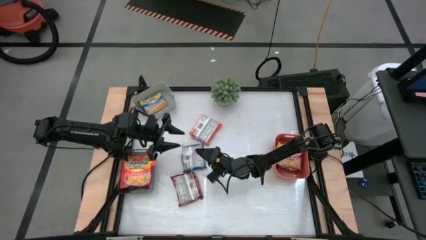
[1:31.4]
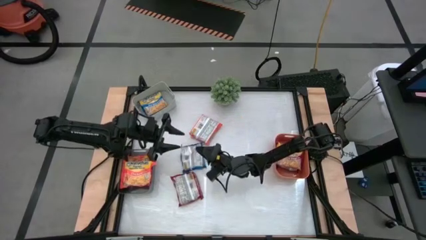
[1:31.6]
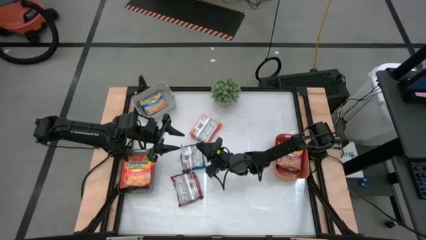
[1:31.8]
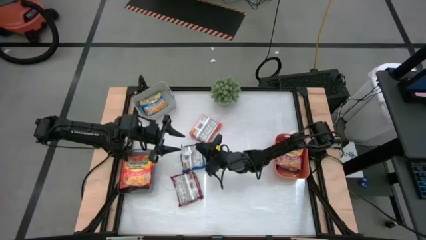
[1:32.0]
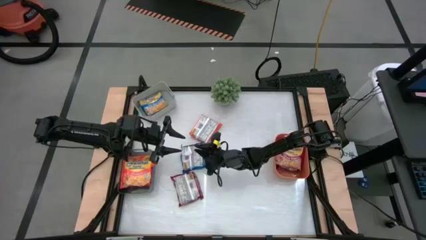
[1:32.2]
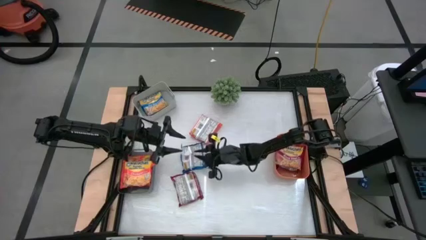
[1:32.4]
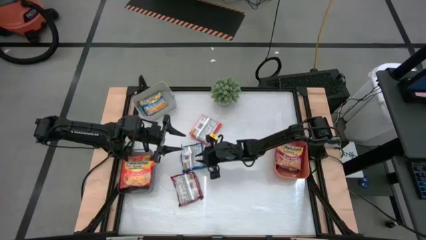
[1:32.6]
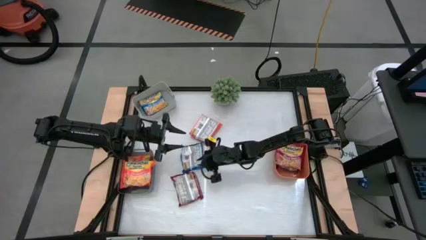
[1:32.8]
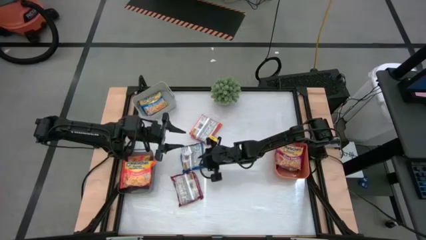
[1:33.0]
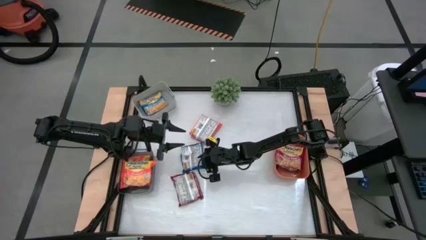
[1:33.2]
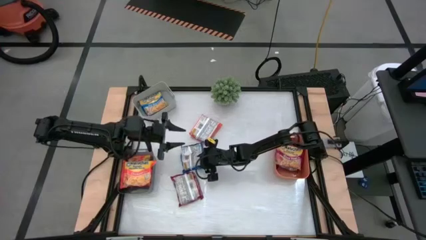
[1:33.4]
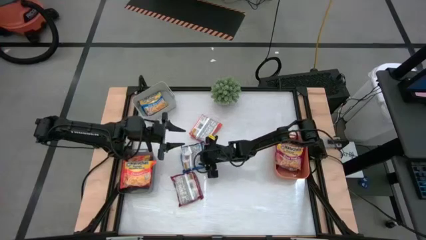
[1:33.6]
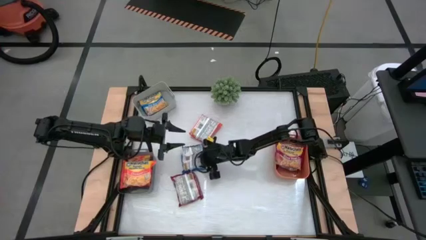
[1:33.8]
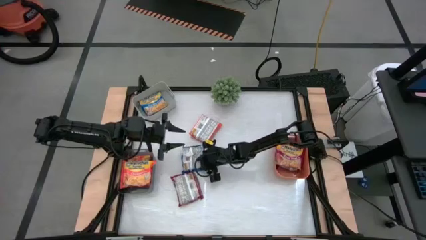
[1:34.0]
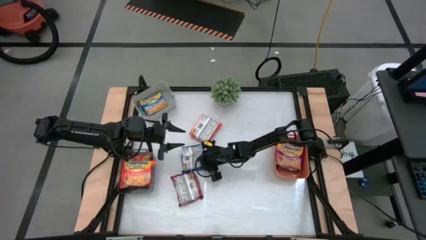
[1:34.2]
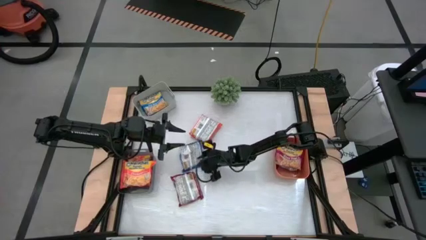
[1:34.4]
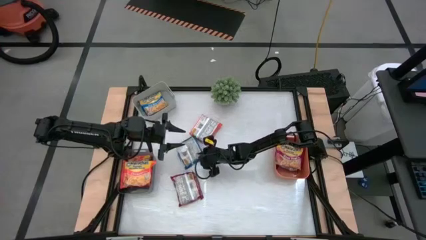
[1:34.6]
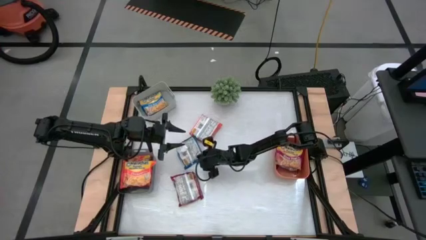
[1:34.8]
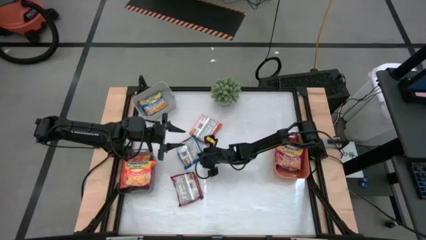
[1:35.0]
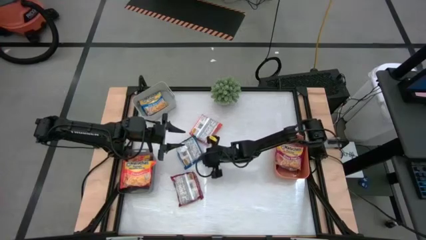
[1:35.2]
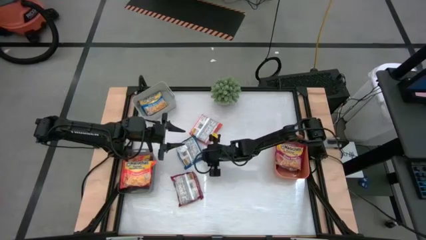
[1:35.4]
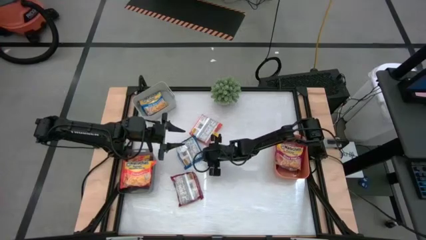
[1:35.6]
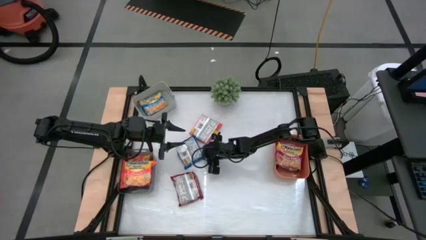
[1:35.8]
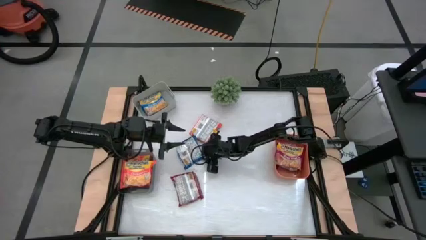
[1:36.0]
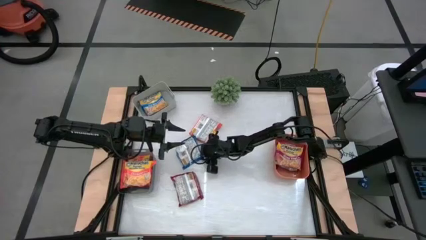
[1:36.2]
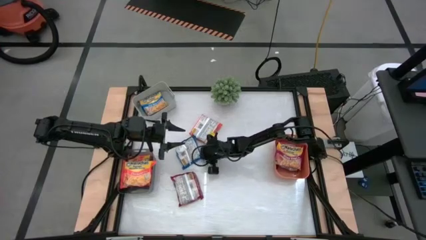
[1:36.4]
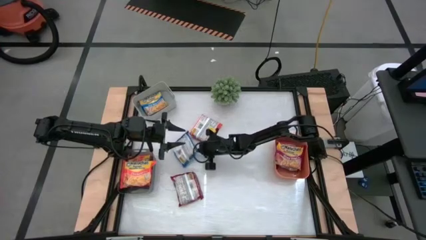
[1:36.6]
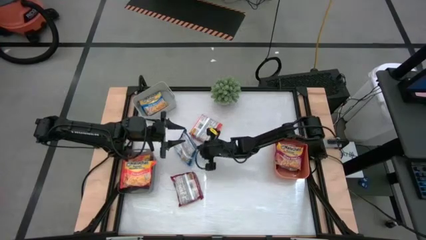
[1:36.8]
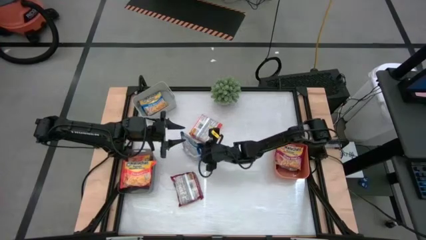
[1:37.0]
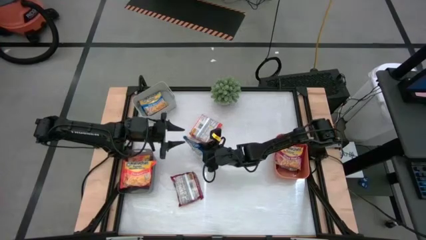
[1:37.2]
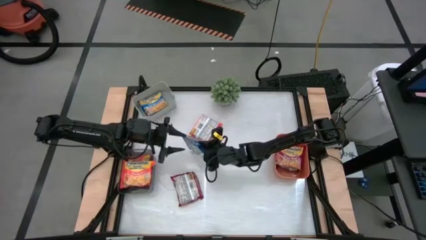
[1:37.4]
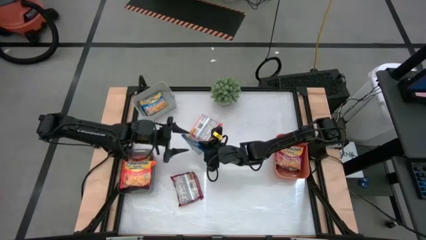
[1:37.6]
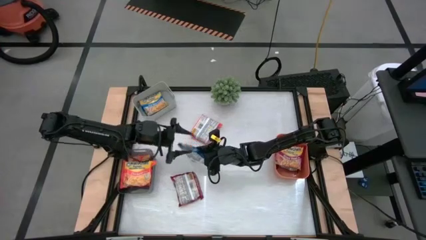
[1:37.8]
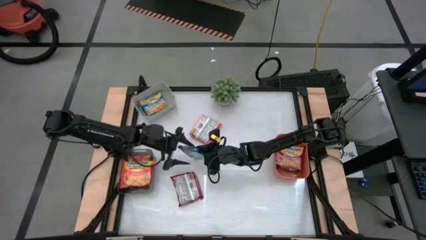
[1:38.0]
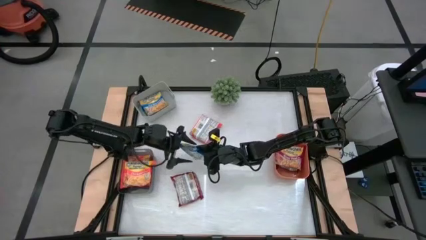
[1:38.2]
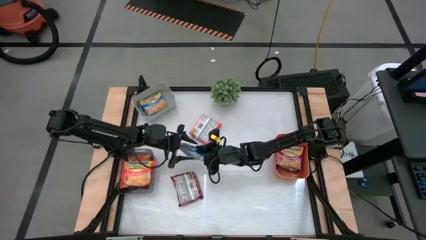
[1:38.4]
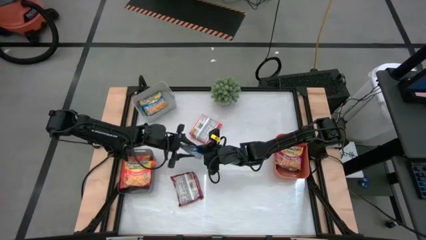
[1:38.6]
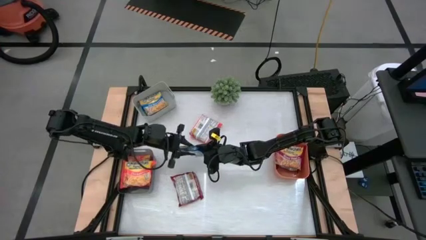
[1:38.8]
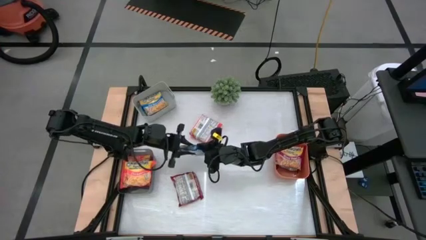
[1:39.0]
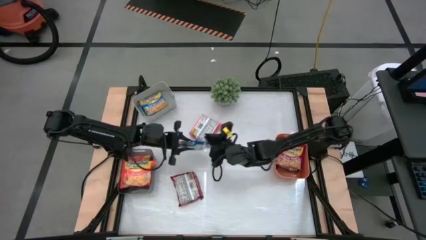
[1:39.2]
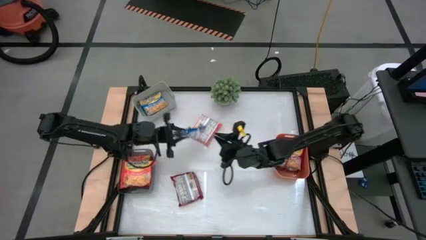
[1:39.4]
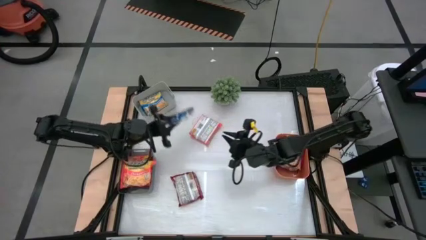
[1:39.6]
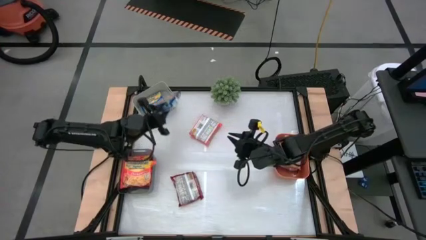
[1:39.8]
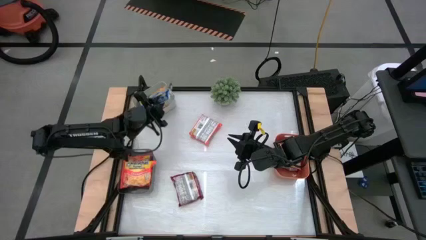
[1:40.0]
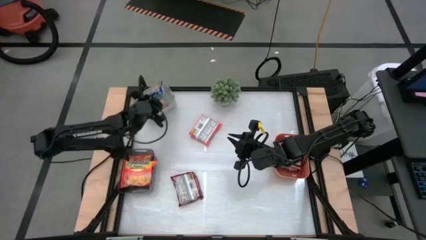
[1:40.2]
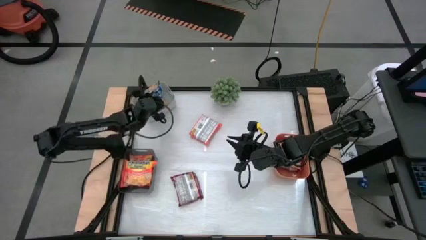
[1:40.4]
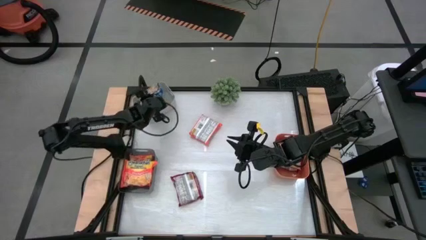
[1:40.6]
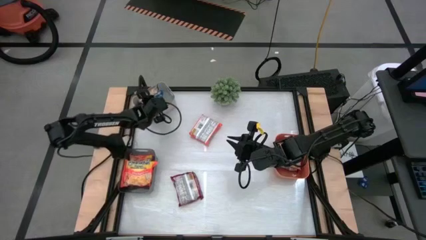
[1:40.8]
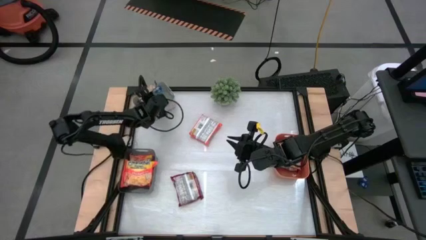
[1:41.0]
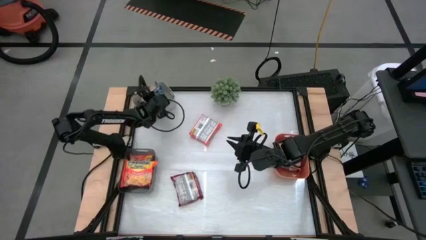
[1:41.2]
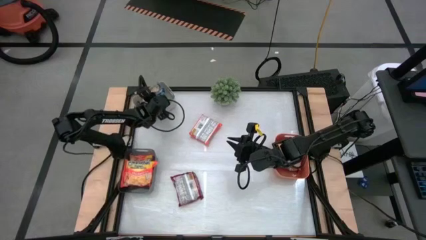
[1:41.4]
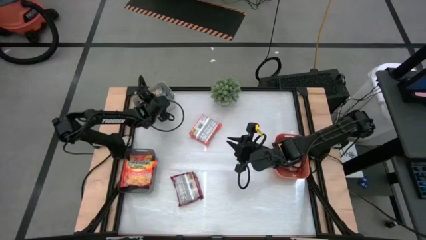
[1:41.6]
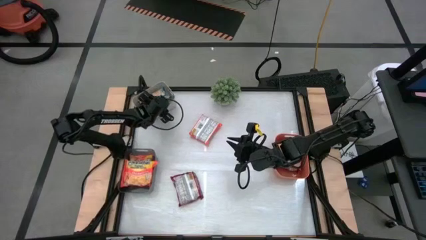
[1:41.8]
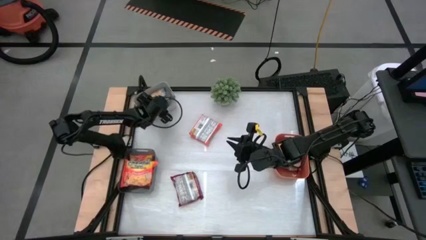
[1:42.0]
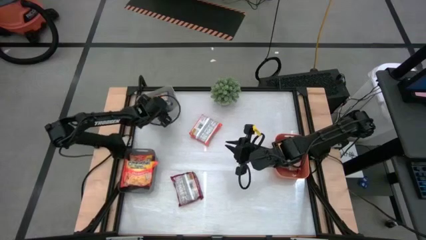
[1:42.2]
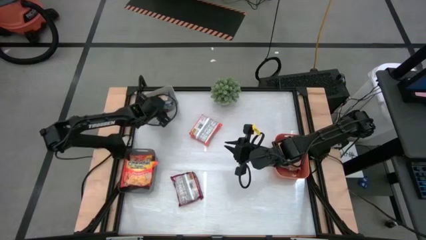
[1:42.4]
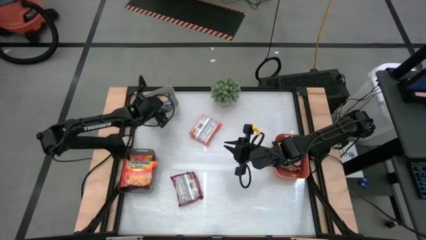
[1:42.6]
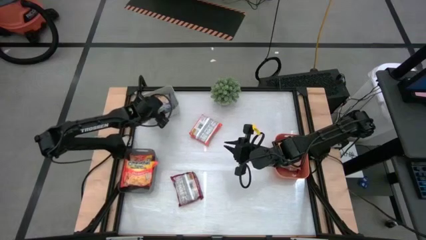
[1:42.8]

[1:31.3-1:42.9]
Task: Sort Maruchan noodles
Put the blue bag into the white bin

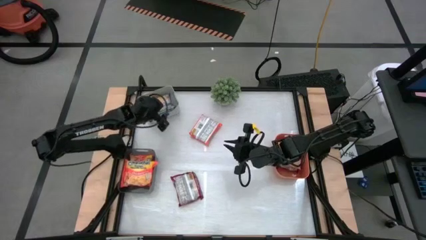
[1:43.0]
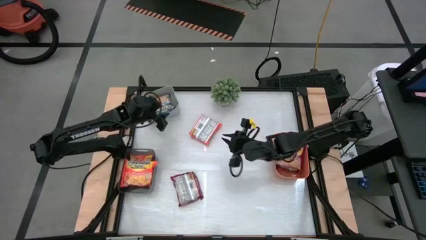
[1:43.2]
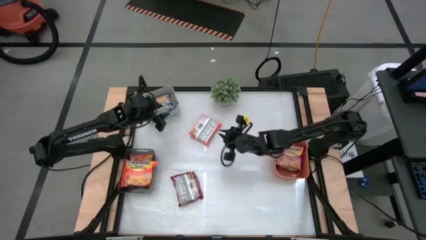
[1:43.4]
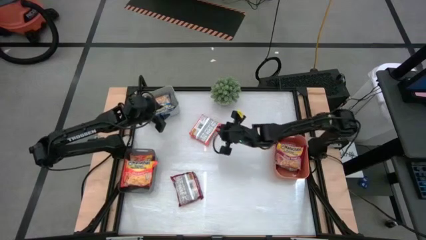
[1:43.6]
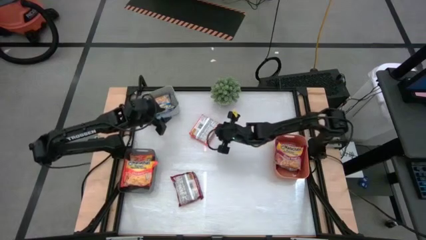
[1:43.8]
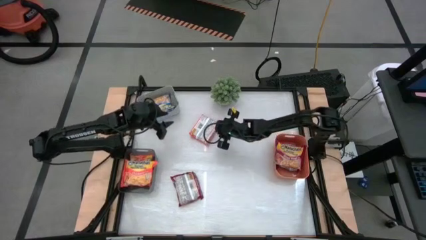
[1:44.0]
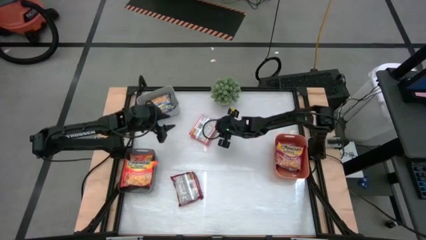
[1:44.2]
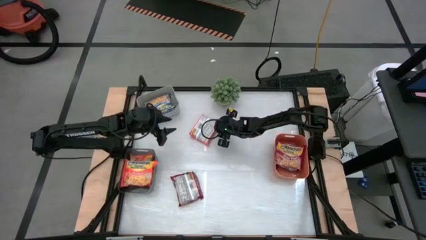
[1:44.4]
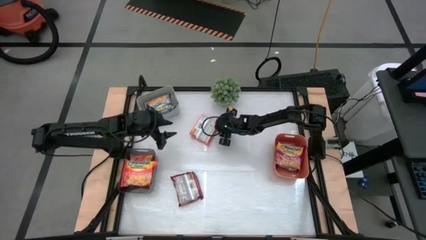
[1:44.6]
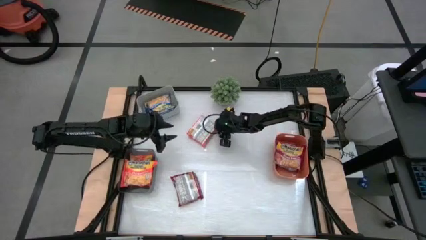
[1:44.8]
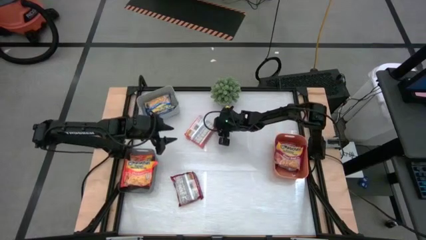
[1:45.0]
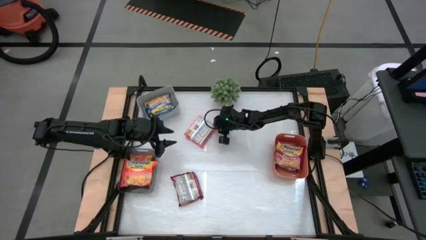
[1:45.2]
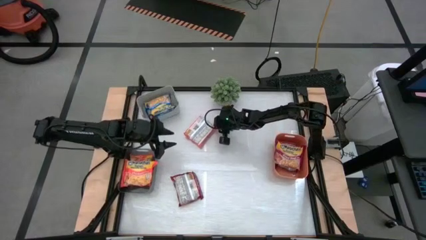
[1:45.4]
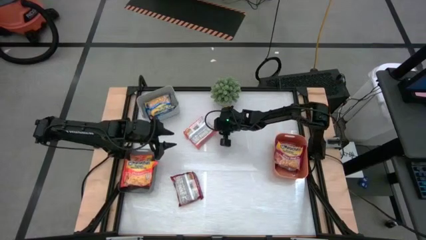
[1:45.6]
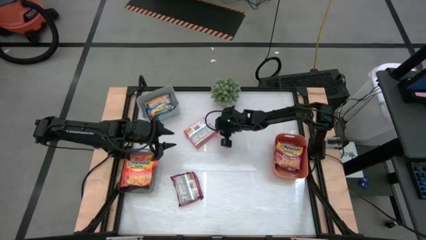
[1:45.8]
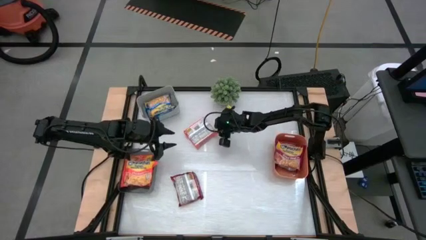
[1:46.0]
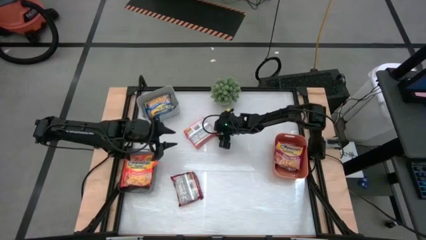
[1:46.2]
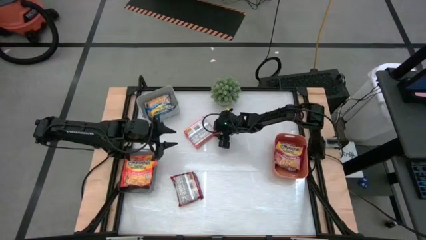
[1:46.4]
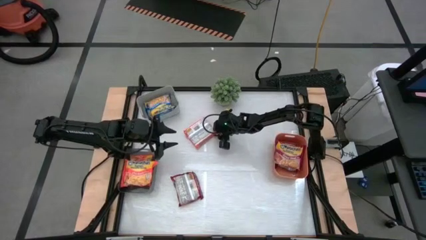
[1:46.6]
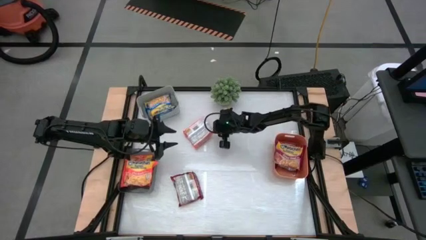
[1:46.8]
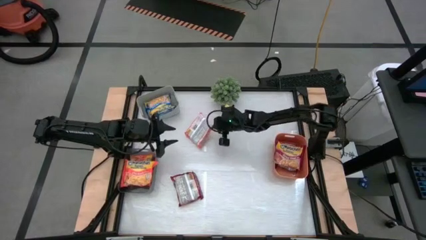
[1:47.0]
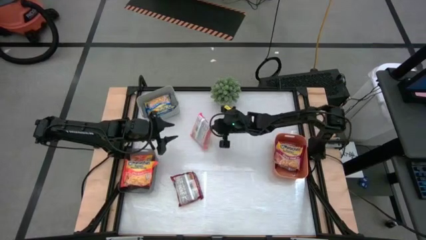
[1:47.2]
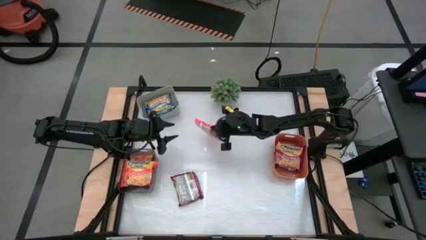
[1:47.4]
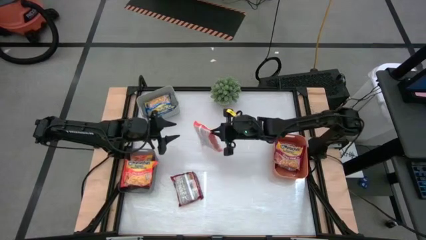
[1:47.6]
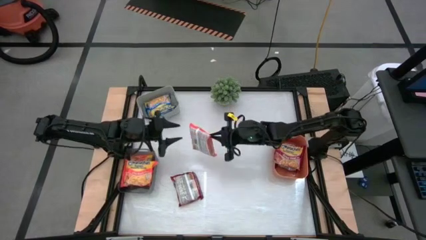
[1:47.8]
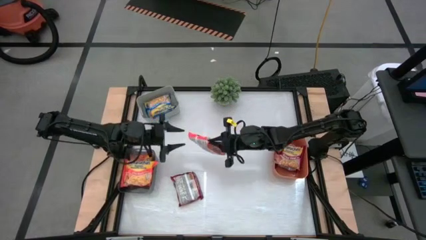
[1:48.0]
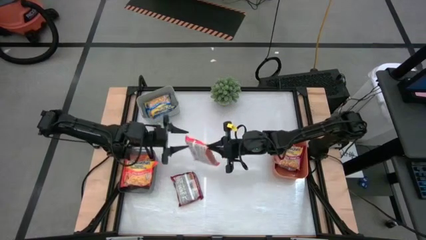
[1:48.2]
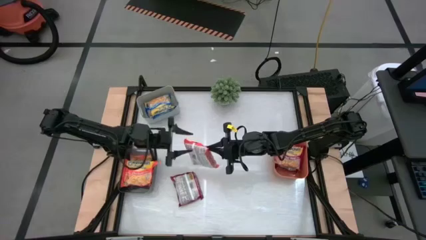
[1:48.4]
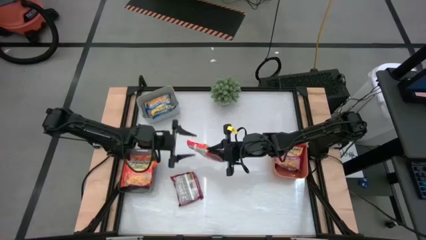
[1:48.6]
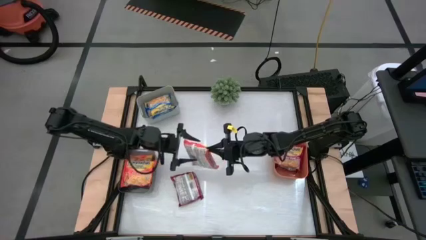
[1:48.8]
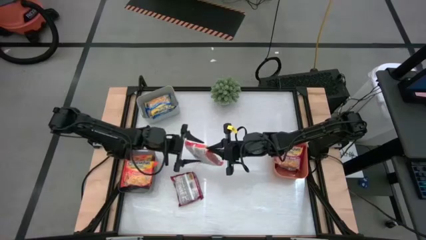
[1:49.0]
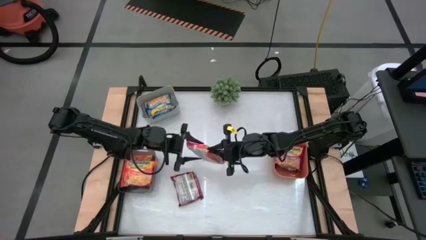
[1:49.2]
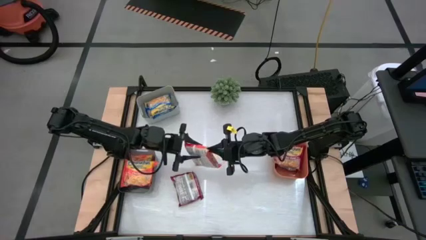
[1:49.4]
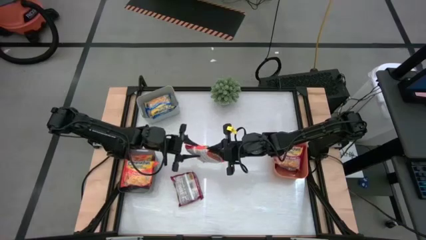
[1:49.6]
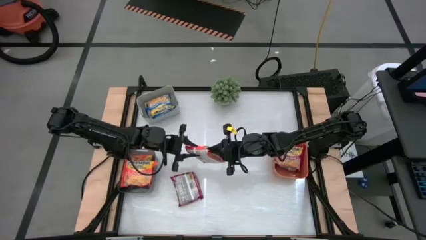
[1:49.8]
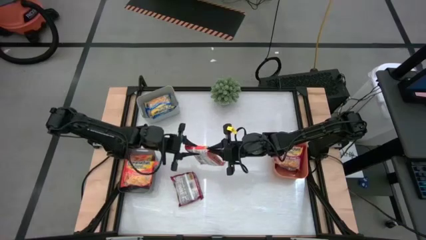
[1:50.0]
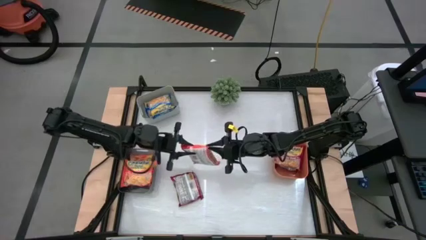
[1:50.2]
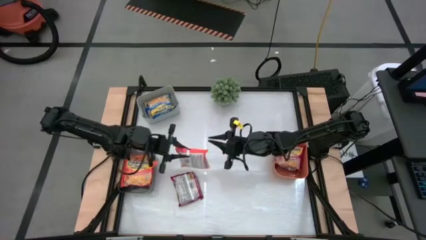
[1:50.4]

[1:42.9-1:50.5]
Put the orange bag into the black bin
